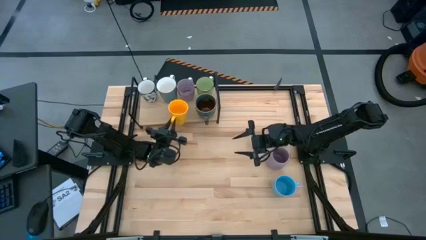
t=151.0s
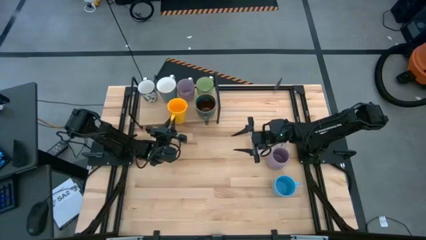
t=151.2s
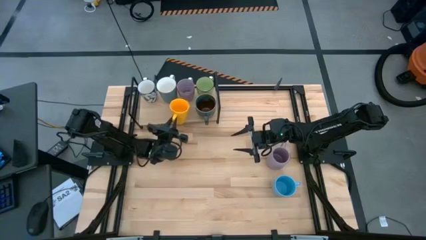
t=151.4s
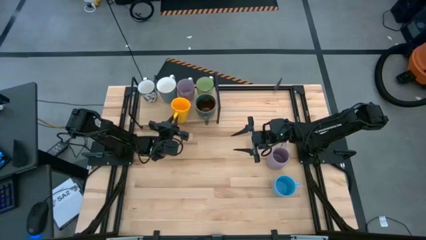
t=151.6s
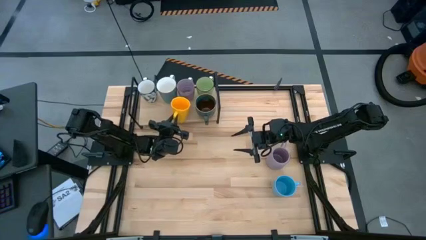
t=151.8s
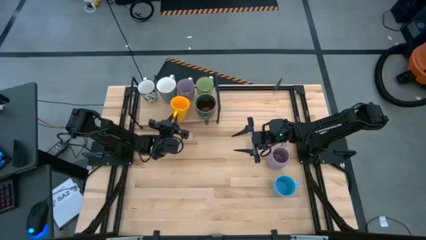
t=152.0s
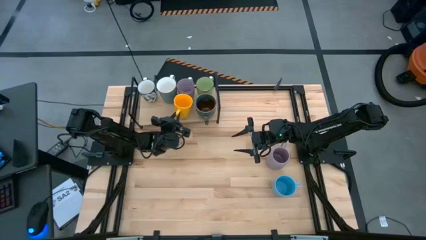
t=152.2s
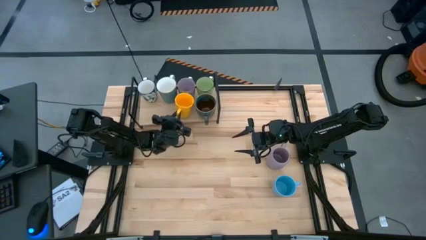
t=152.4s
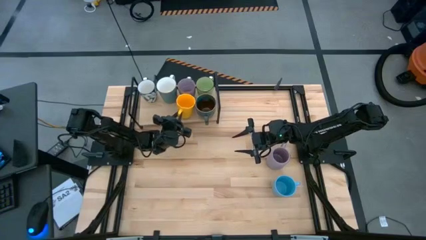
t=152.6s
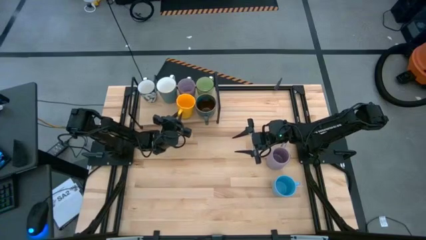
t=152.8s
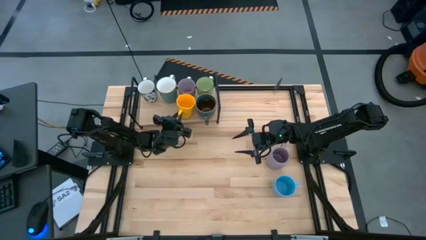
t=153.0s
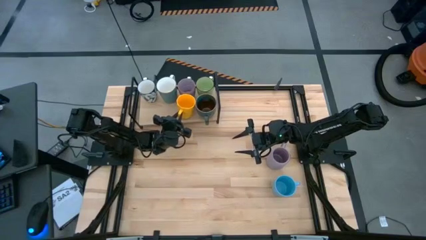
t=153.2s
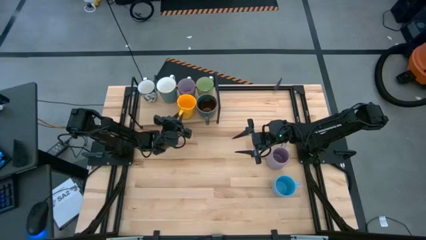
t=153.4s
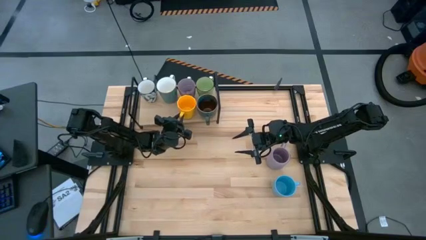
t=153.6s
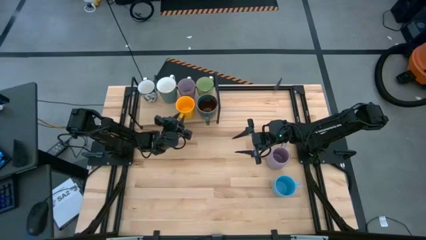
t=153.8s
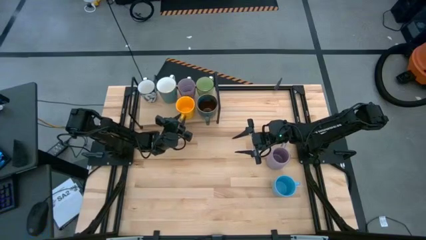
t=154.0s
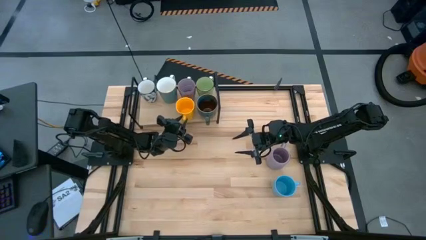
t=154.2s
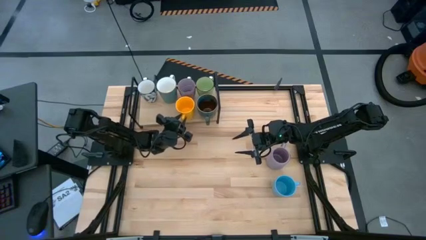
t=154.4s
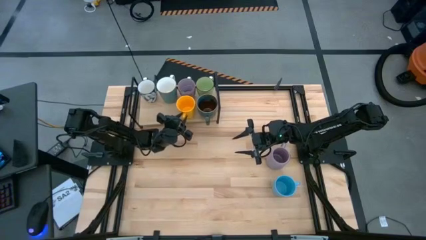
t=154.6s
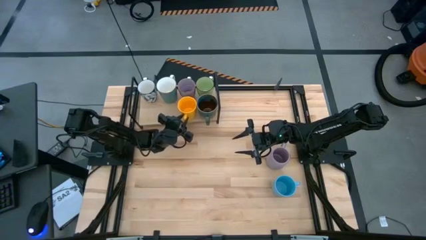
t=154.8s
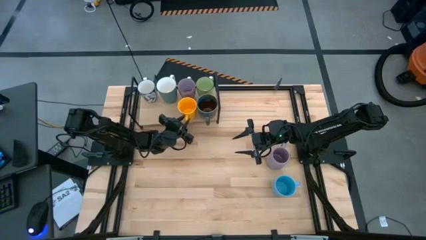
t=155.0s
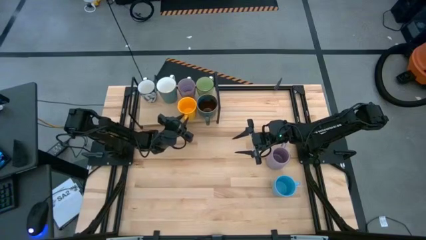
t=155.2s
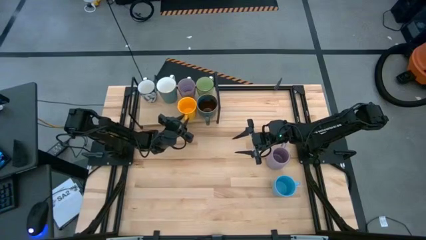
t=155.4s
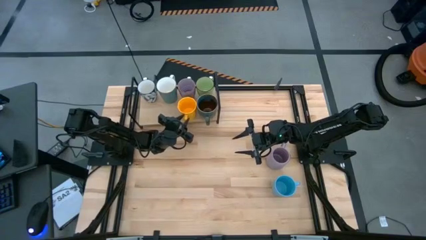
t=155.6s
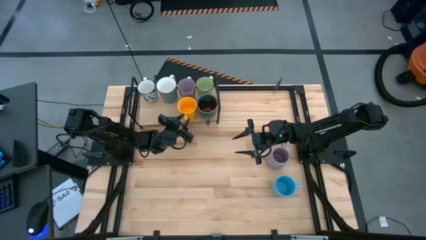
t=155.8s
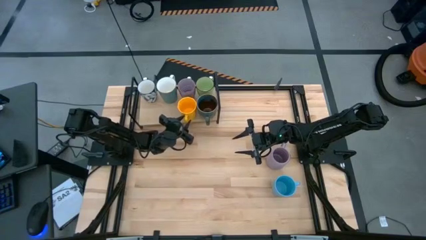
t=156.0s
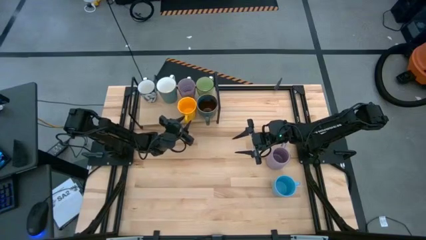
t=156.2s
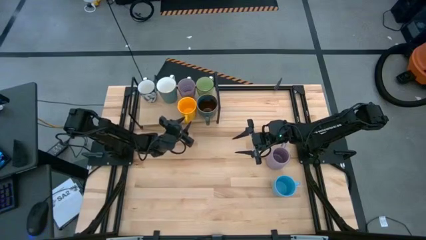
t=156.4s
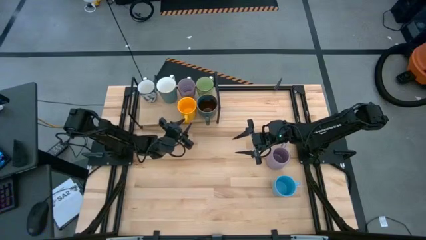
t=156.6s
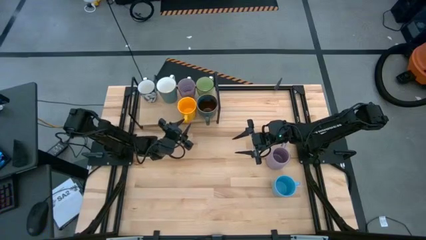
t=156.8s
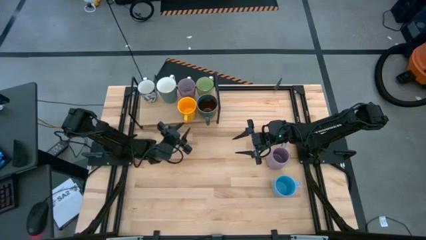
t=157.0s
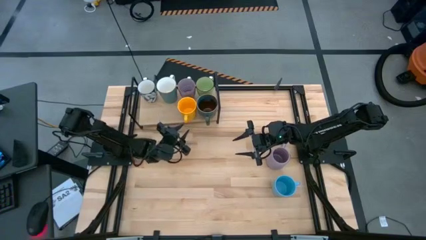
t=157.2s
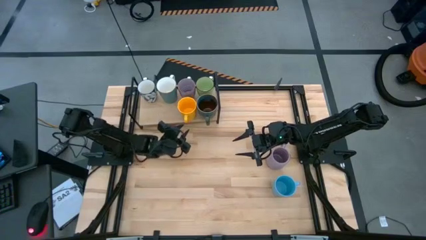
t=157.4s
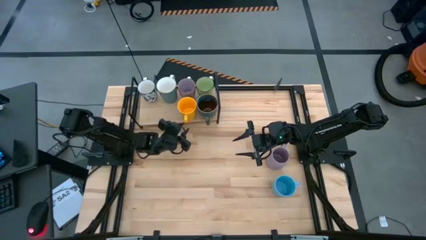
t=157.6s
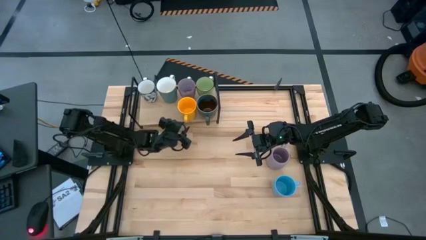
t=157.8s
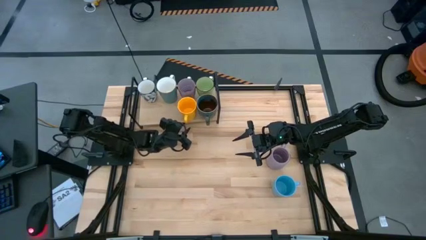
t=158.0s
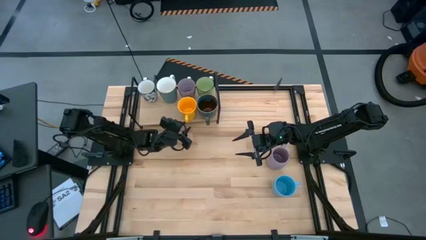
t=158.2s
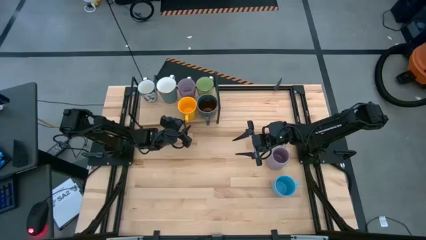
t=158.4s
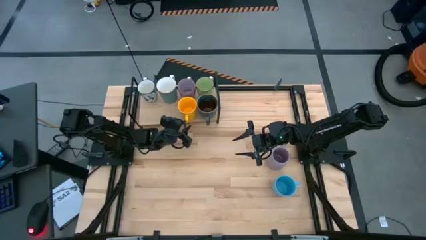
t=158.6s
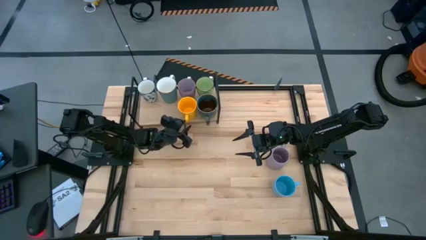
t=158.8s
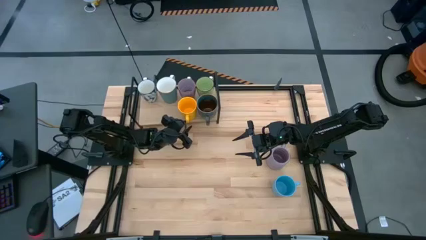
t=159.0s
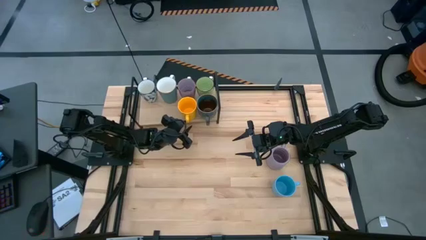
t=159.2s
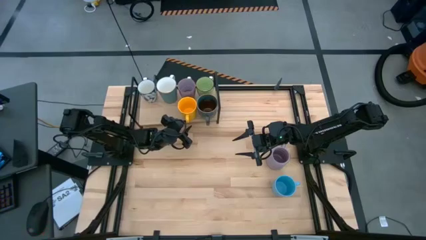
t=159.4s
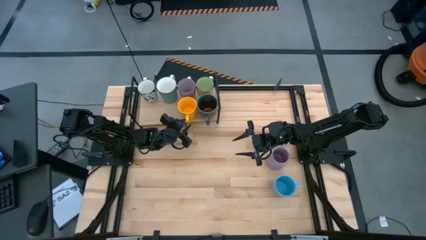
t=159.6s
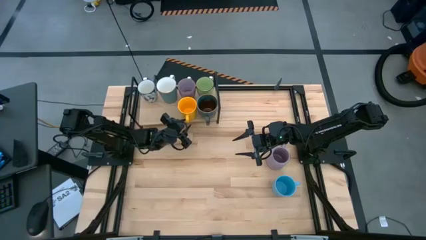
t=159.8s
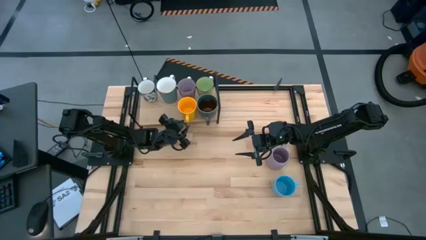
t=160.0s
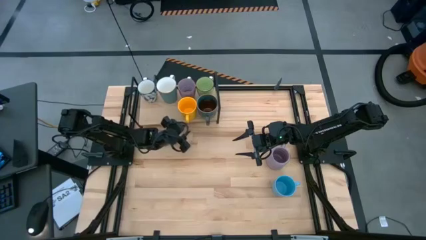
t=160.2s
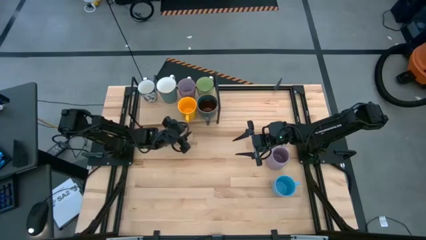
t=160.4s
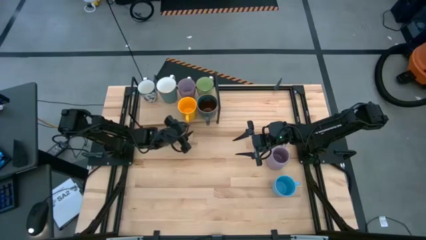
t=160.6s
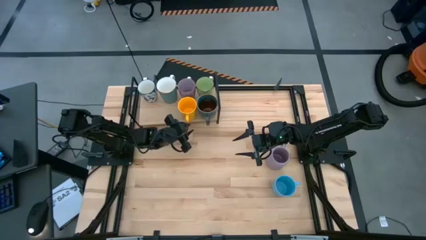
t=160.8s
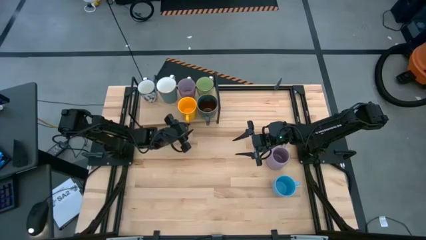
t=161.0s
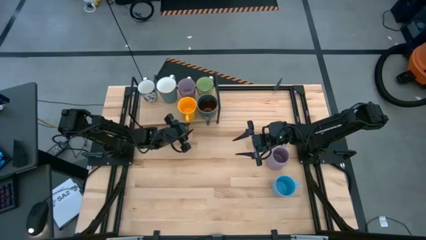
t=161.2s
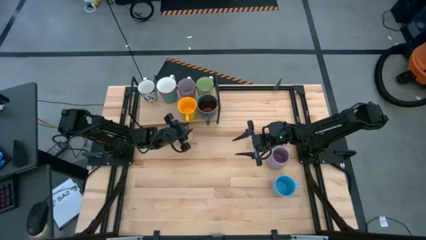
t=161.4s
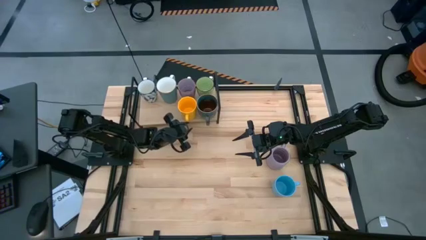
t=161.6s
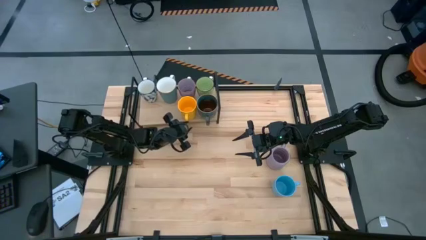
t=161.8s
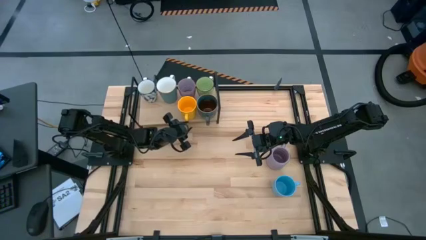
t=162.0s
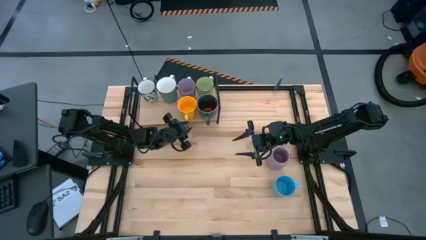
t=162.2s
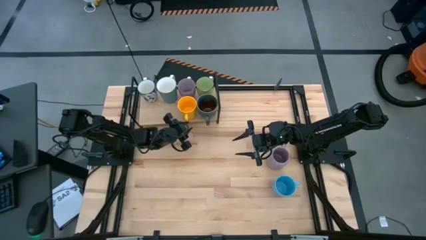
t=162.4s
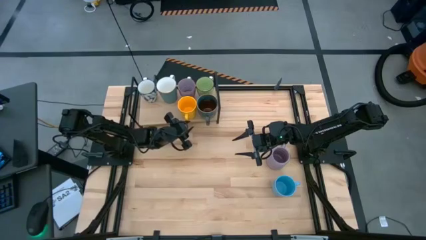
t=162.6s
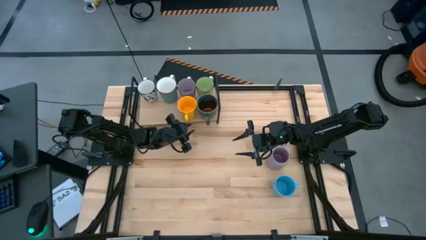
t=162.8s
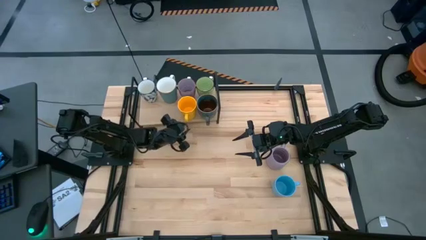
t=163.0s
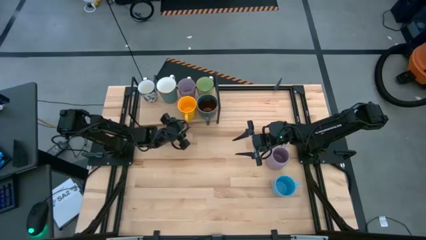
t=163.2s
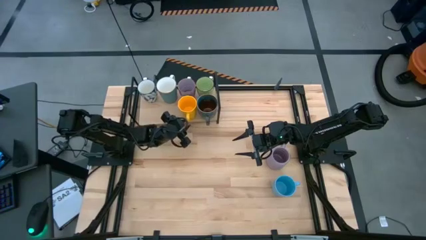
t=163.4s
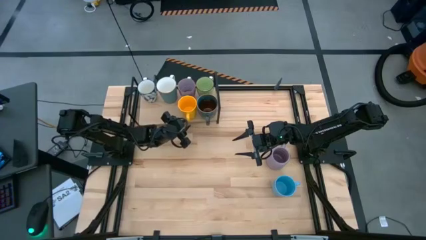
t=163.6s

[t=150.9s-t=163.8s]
Task: Place coffee mugs
Put the yellow mug on the shelf

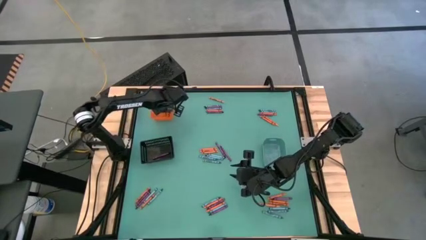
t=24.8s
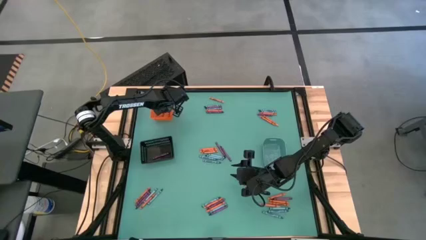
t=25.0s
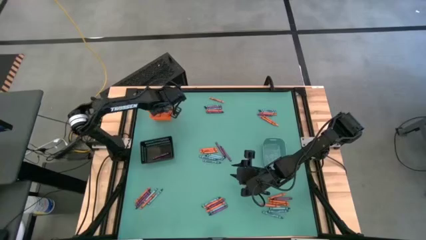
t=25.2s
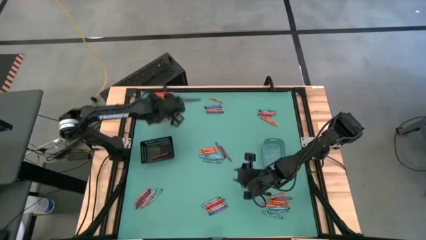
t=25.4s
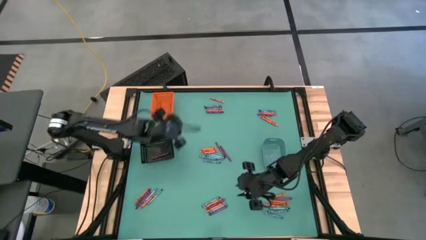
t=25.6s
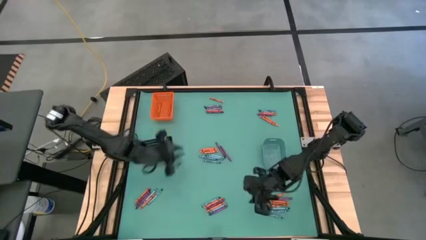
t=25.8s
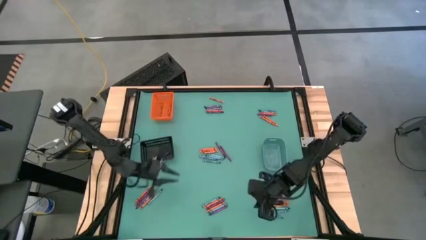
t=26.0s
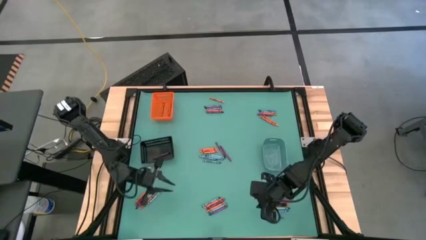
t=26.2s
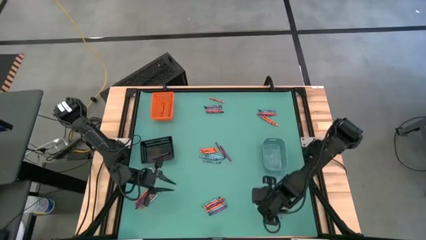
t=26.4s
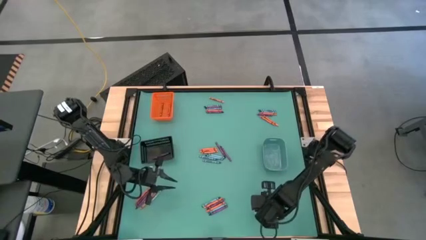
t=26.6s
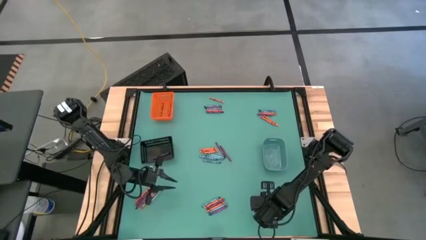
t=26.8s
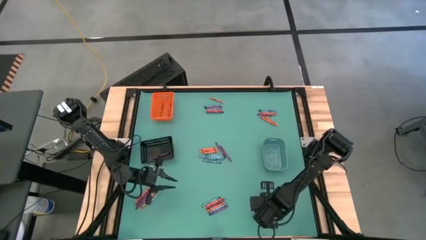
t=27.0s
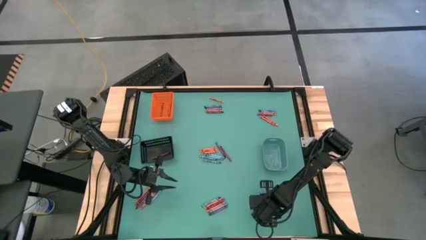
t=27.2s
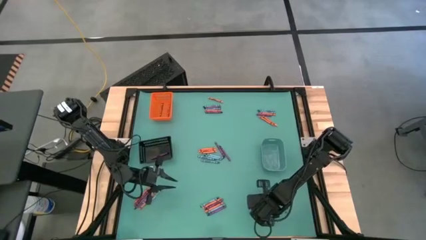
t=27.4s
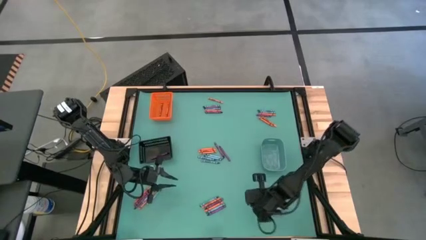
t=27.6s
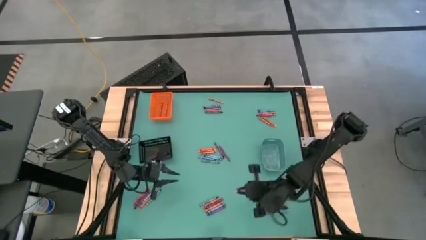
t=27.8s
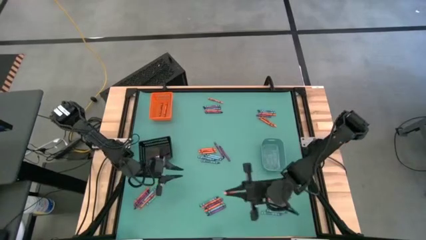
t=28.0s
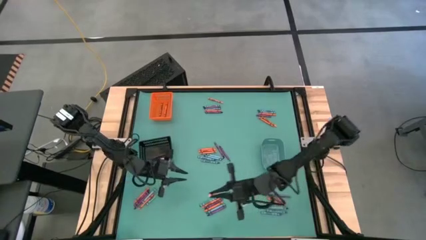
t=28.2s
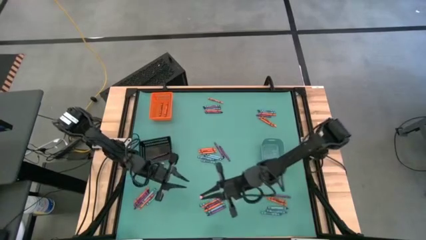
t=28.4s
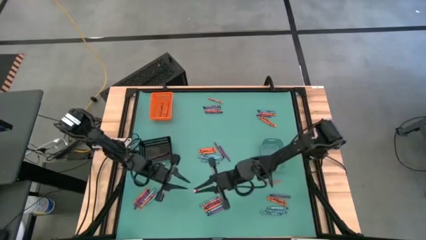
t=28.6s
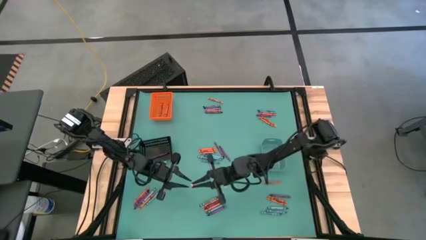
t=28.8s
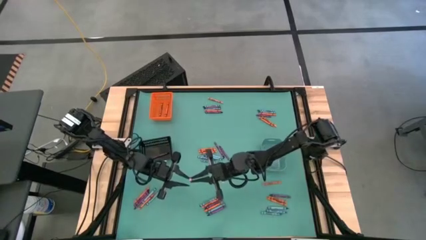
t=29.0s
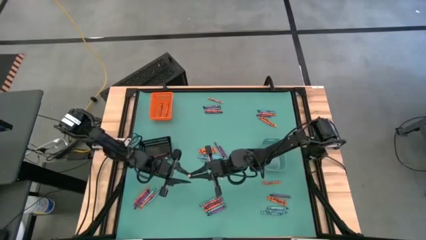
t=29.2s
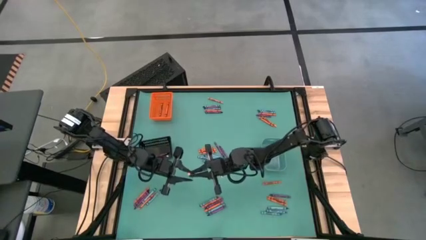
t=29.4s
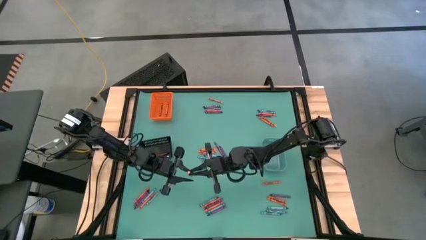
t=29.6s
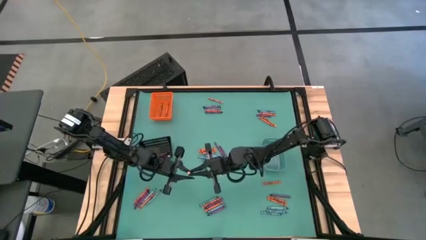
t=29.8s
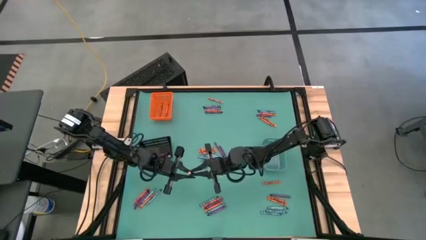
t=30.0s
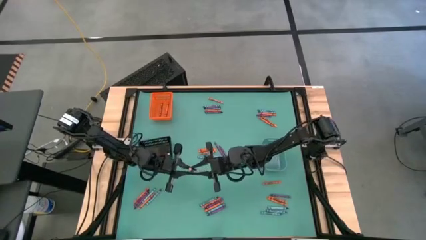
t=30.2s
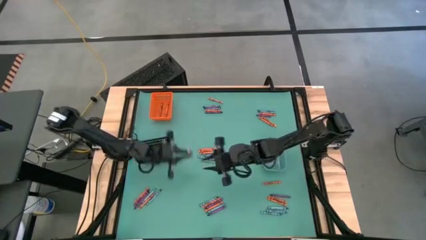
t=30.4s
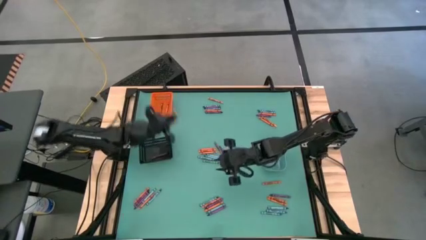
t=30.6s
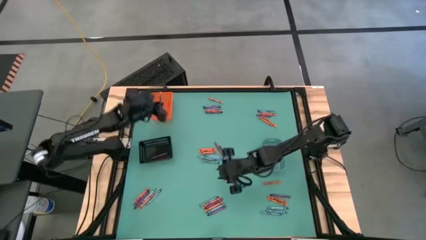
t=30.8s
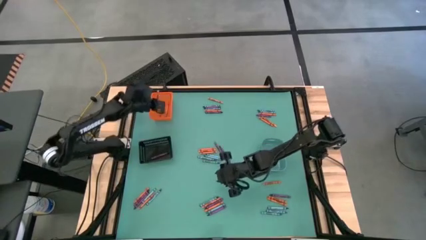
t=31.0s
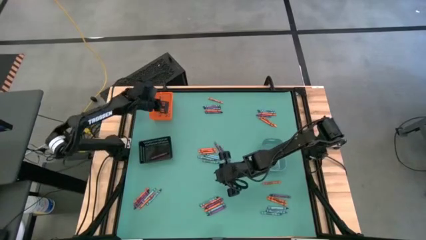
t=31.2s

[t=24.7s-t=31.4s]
Task: Sort crayons
Put the orange crayon into the orange bin
